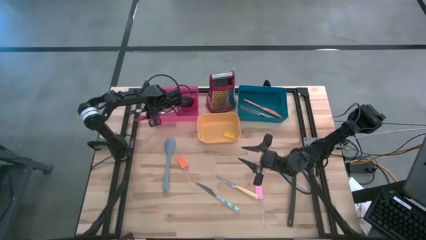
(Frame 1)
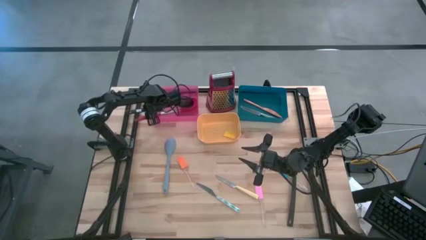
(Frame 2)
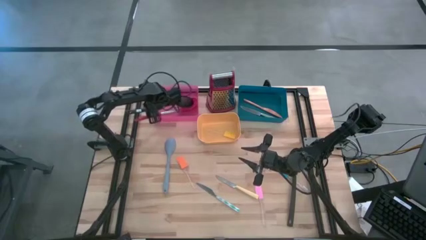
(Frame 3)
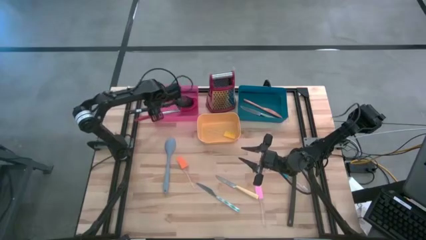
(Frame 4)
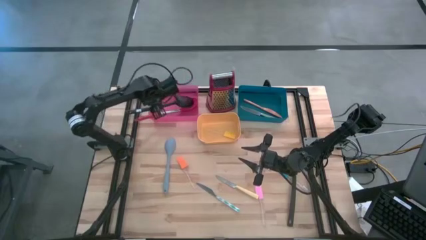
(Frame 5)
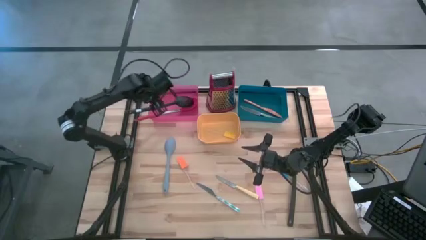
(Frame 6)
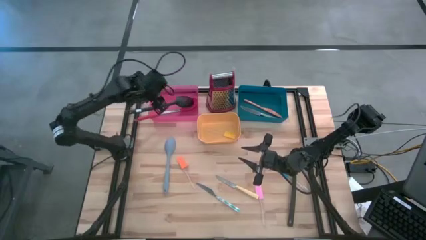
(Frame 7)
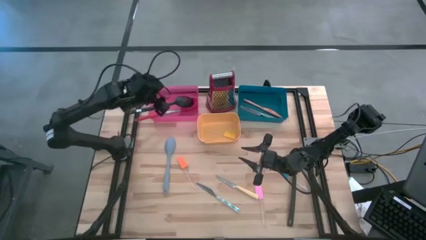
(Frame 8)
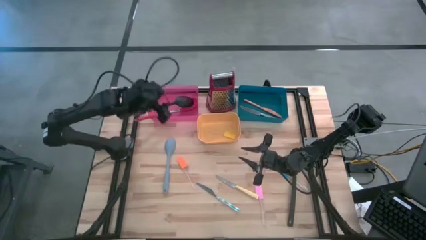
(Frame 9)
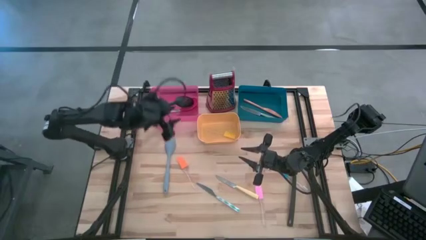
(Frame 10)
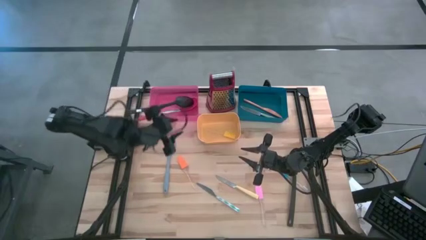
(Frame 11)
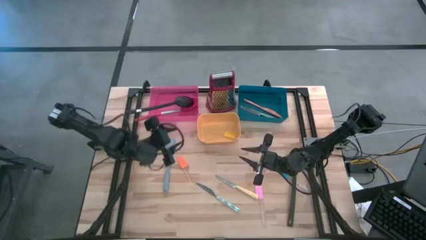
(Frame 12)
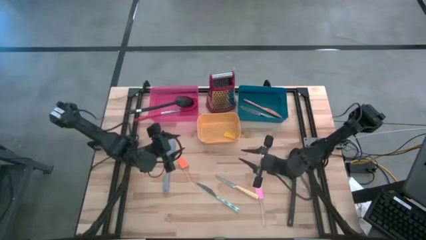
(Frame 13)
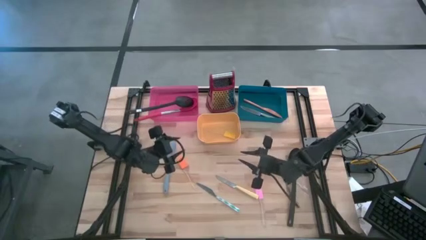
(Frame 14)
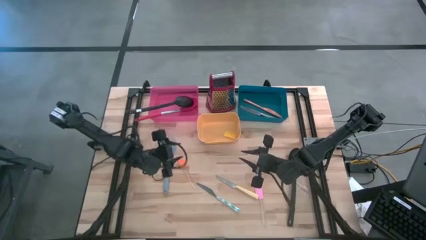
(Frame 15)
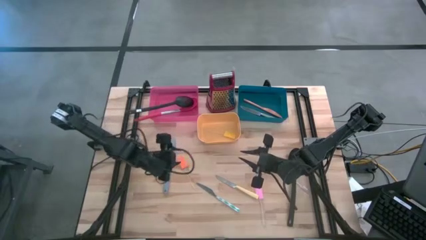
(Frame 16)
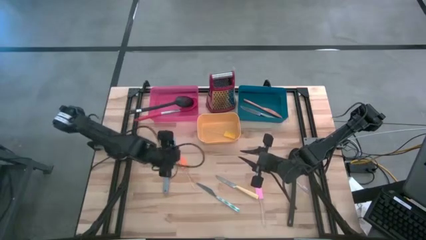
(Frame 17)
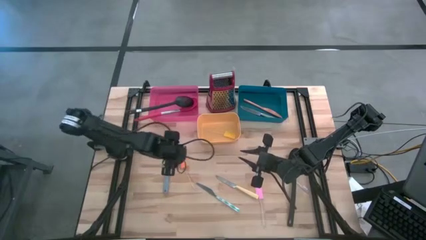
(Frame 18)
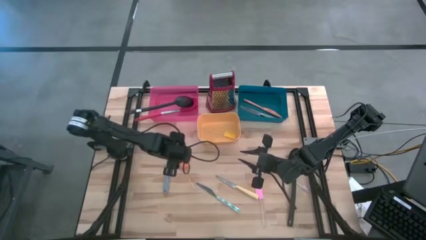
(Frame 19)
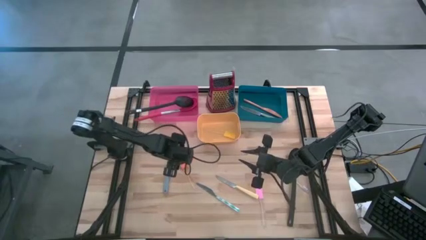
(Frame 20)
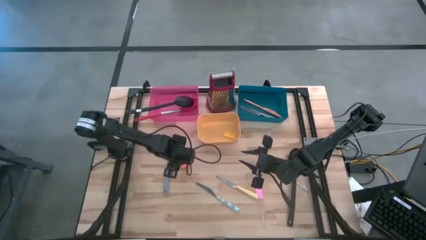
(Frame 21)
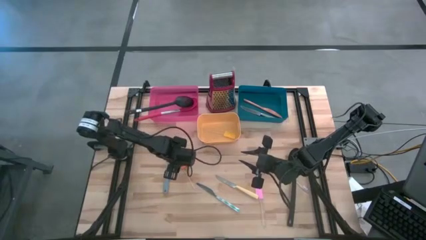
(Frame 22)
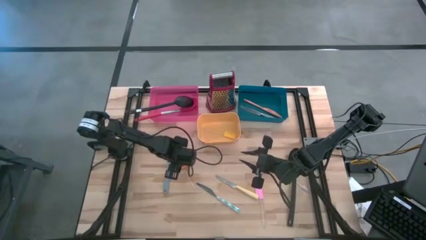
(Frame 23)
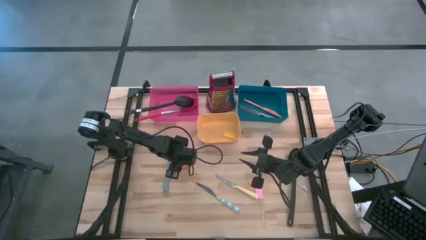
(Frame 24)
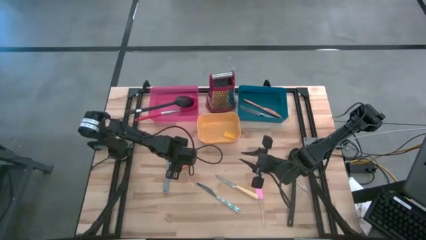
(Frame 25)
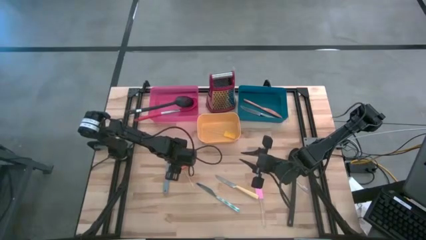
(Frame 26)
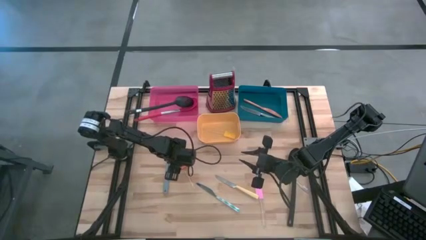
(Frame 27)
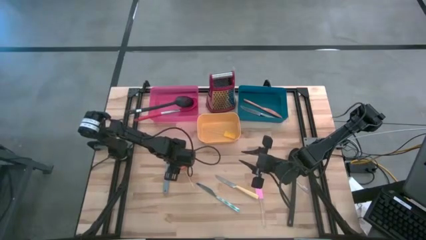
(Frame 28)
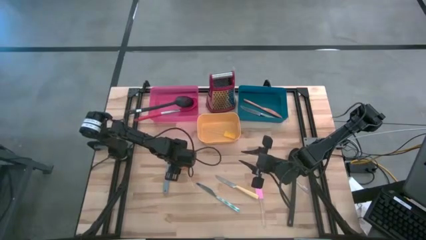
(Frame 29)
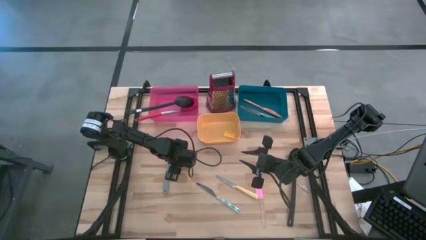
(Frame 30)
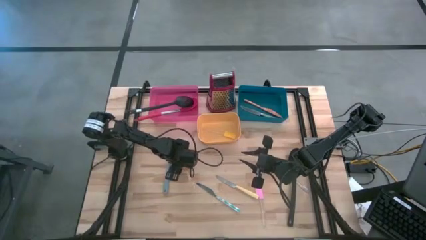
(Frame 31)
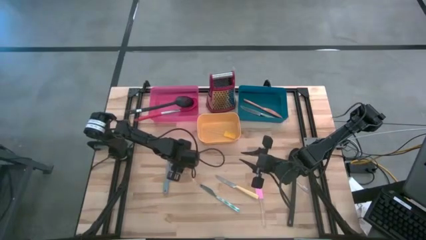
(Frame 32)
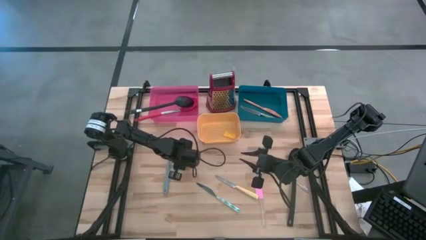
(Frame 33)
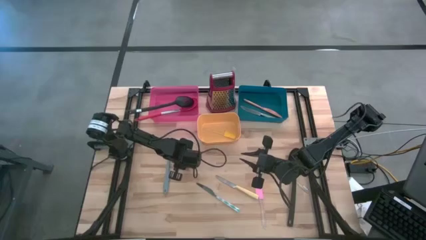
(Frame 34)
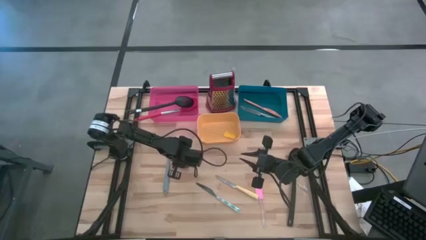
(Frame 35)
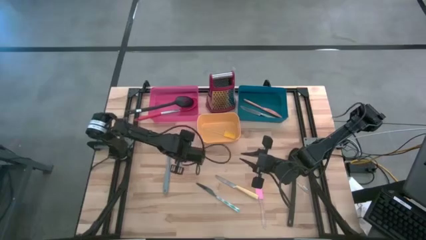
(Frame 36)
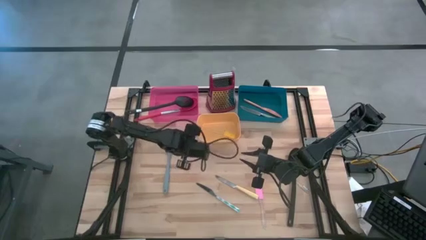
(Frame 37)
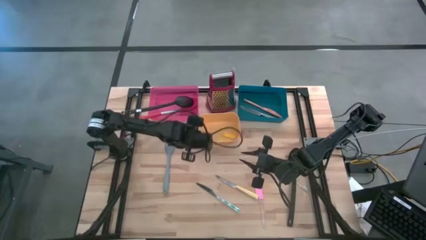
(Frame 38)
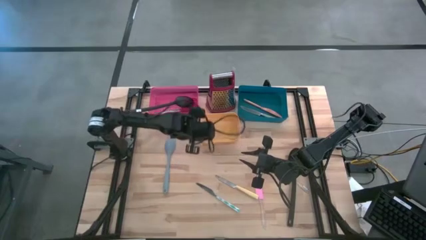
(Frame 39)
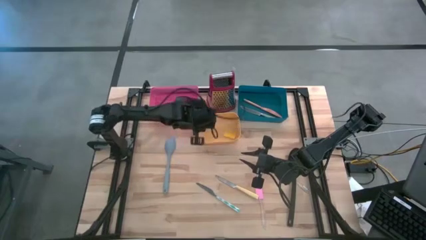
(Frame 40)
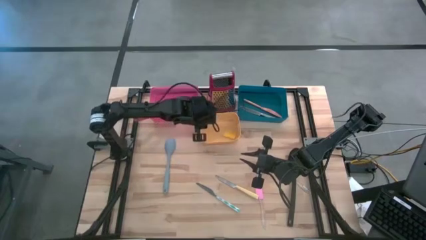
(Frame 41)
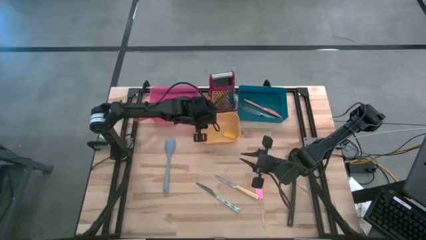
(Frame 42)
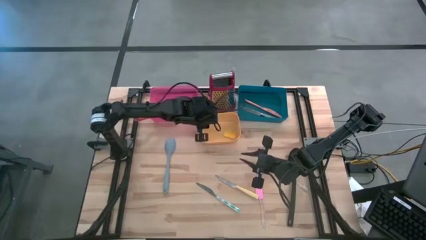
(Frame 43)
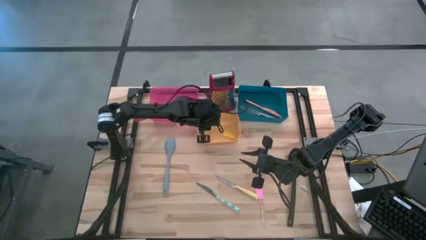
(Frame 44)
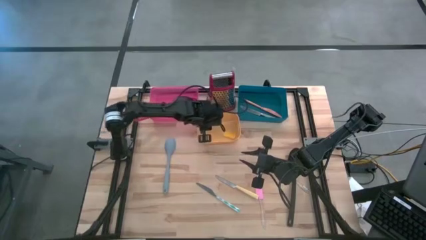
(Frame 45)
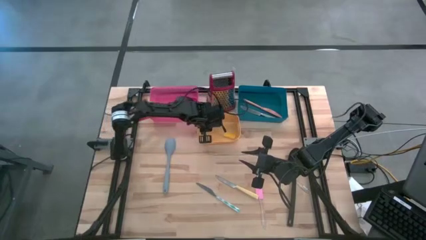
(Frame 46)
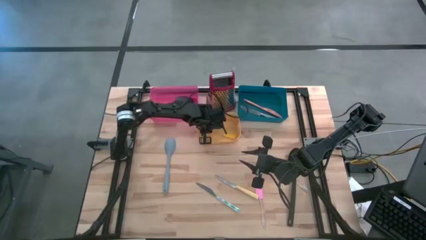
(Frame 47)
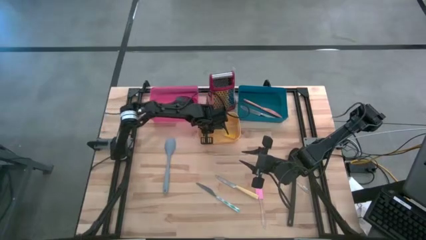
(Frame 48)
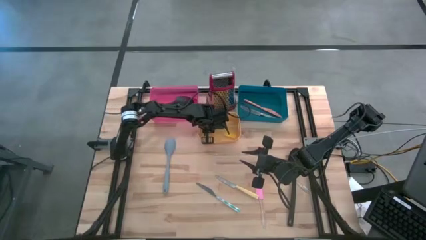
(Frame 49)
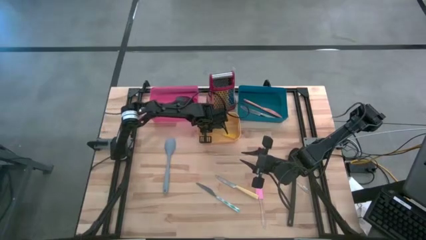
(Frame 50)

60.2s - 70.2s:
Task: Pick & Place Kitchen Items
Put the orange spatula into the yellow bin

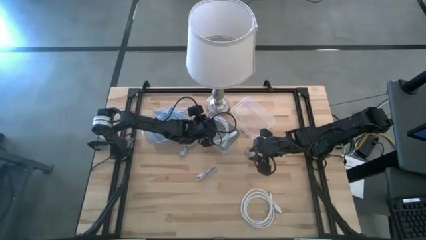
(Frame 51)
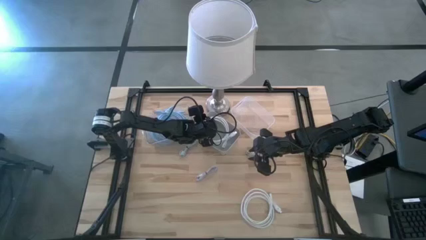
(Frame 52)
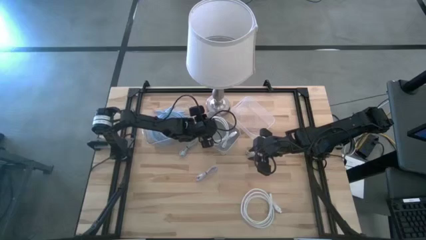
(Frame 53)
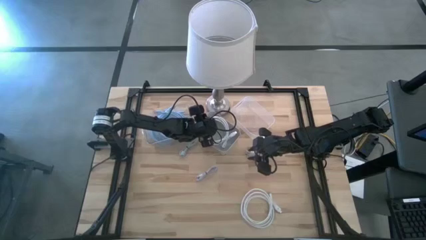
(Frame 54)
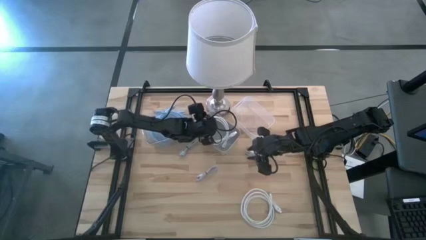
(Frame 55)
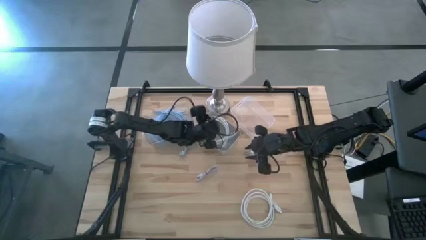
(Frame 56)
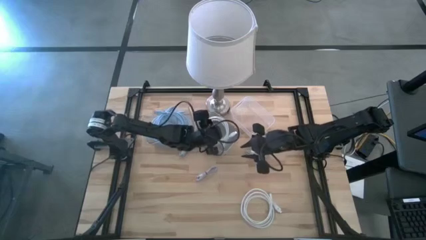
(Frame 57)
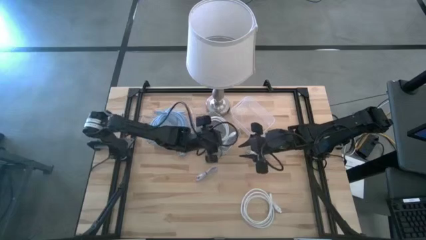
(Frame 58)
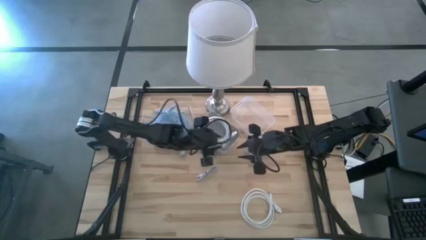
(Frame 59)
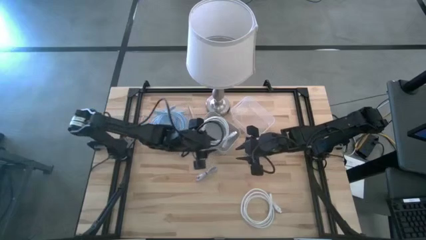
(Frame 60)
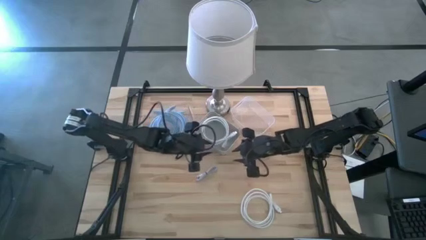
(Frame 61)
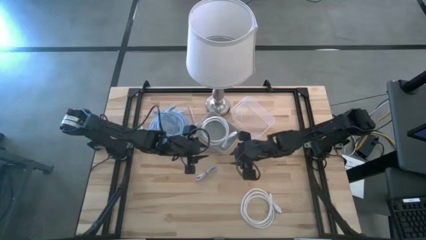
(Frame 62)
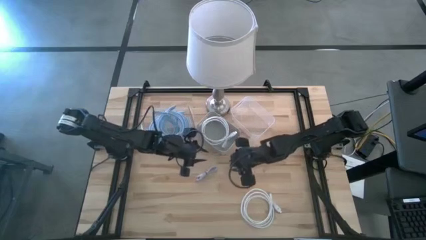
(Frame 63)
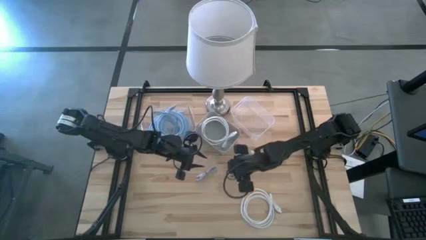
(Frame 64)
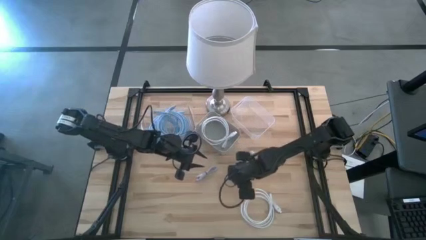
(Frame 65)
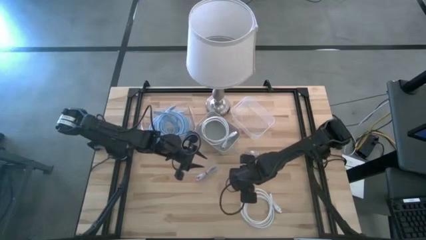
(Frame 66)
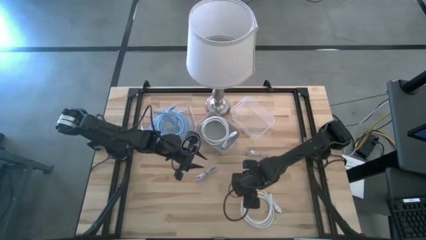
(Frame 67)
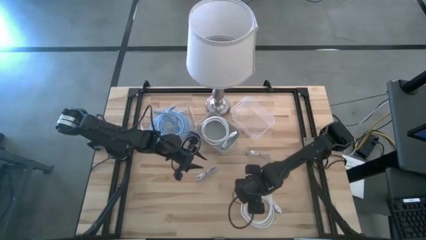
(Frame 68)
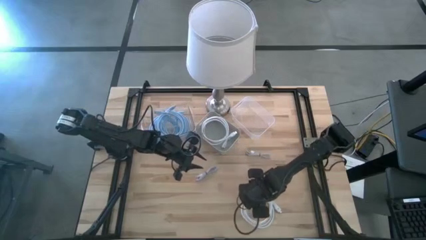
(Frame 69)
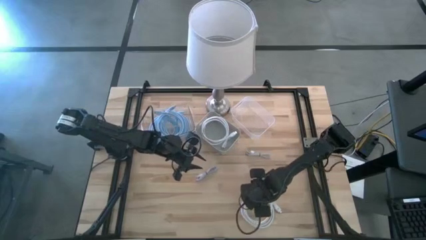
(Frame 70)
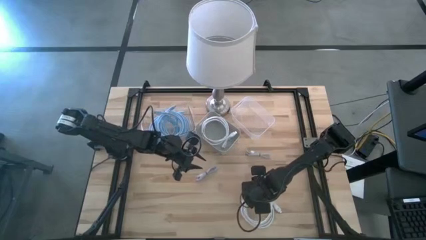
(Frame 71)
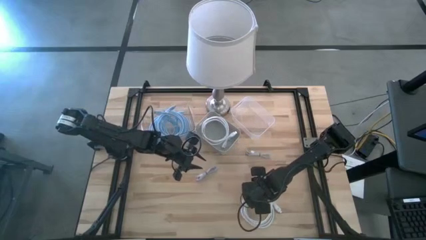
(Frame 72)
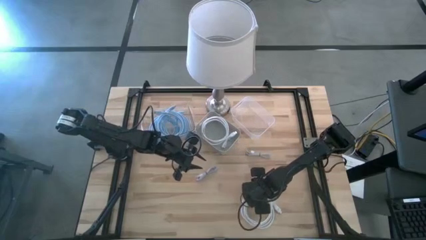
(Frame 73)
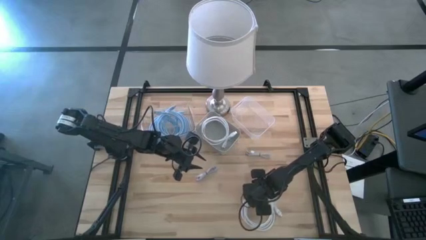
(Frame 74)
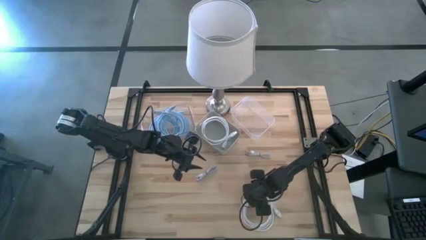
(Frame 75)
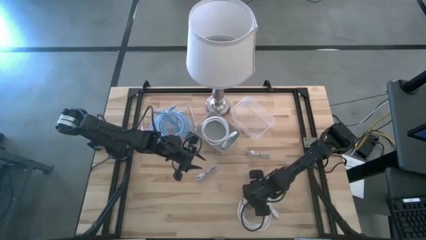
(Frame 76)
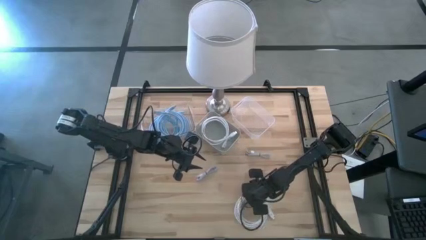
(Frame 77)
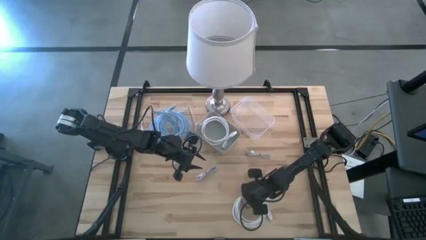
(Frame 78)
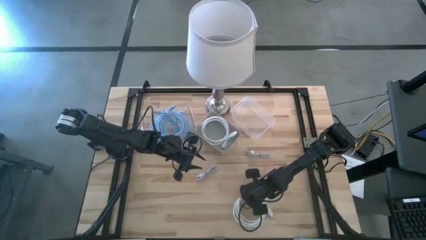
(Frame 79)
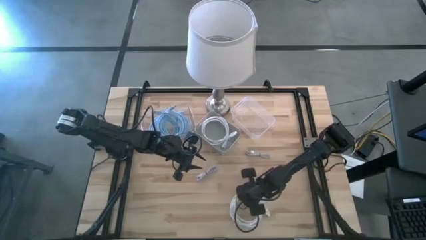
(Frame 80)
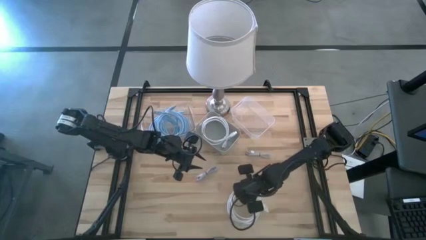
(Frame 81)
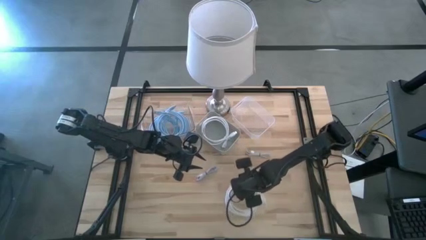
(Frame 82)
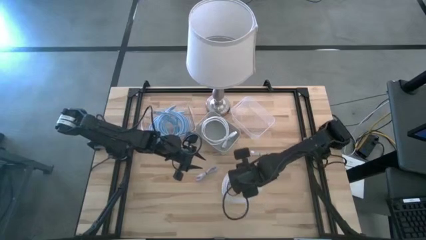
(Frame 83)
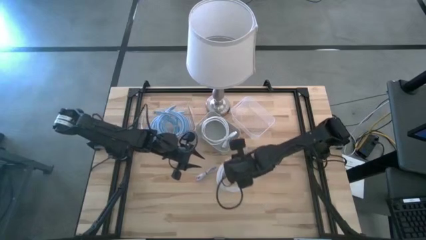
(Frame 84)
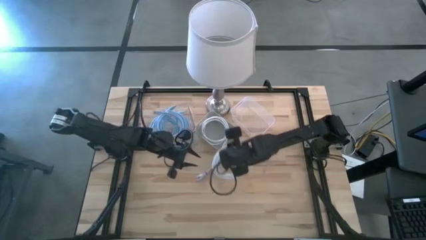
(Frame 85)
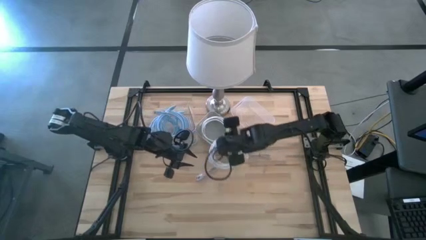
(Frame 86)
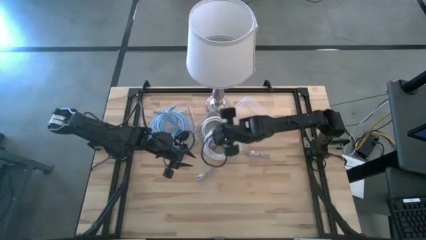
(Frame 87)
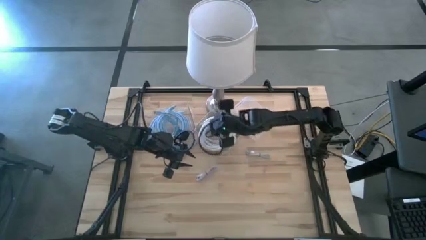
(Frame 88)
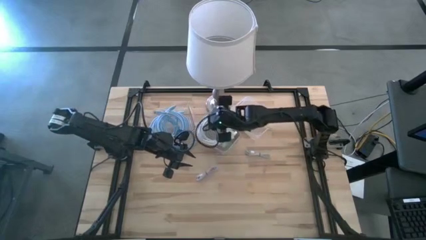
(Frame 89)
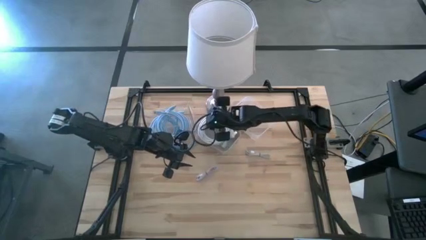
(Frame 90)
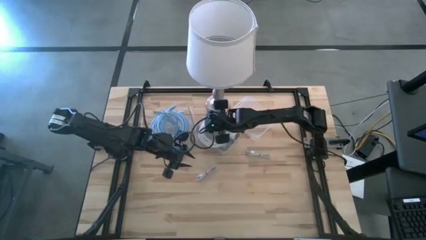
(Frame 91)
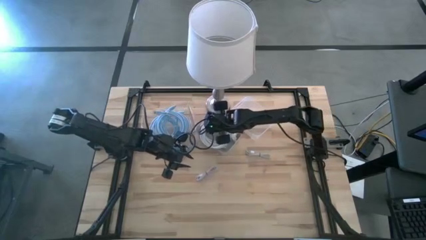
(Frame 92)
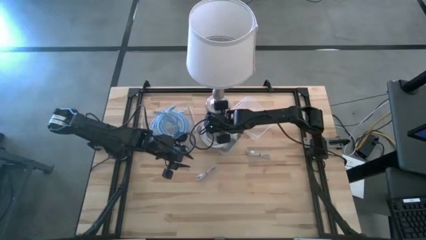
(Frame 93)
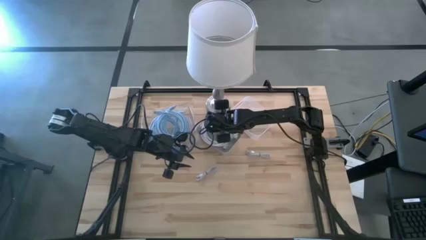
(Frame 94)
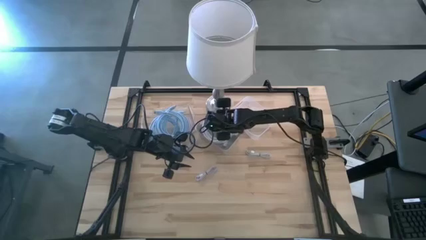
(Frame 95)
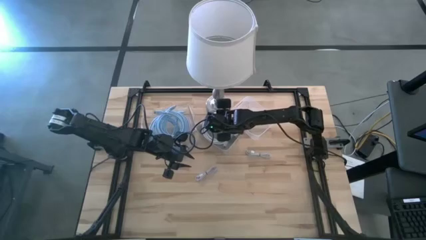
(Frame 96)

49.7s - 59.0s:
Task: Pick & Place USB Port
Put the white HDMI cable into the gray bin
